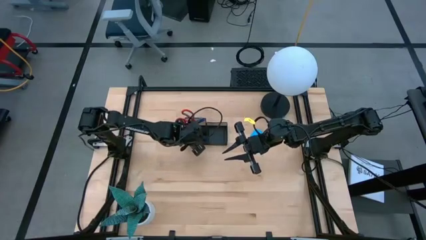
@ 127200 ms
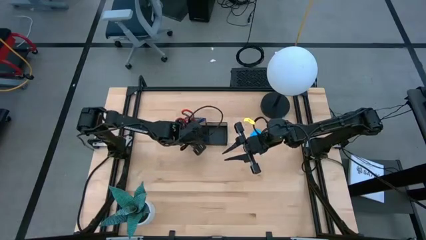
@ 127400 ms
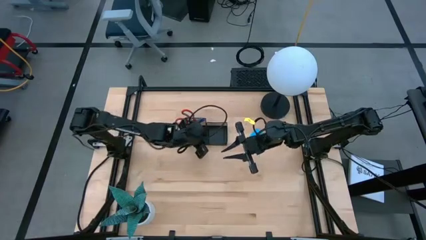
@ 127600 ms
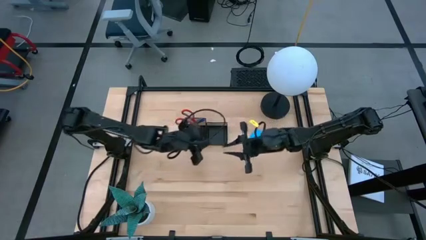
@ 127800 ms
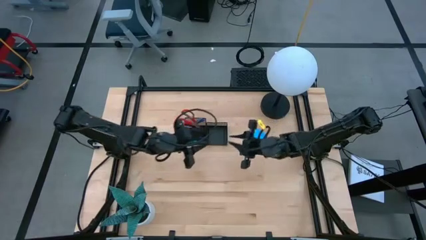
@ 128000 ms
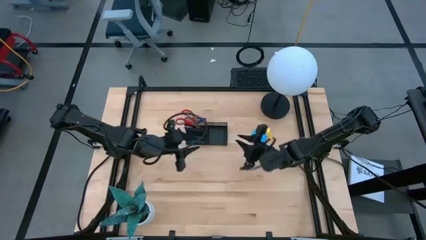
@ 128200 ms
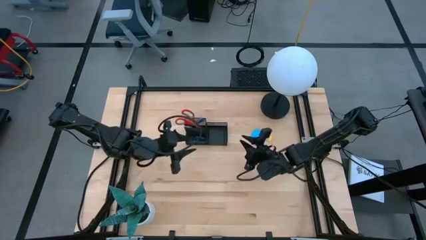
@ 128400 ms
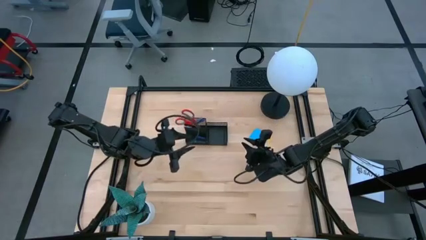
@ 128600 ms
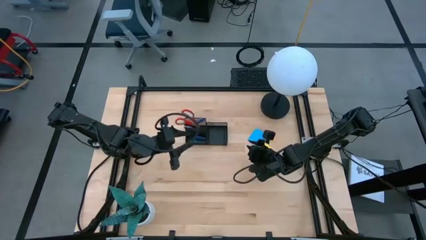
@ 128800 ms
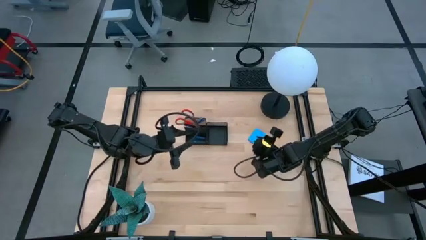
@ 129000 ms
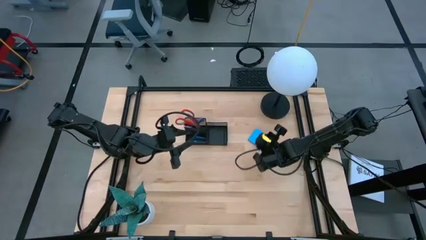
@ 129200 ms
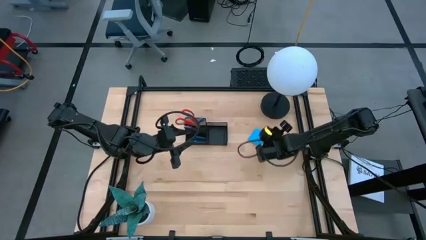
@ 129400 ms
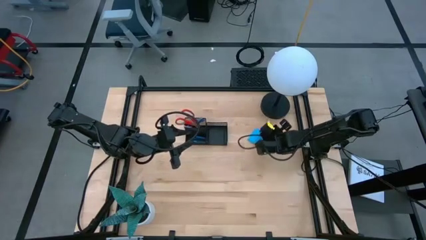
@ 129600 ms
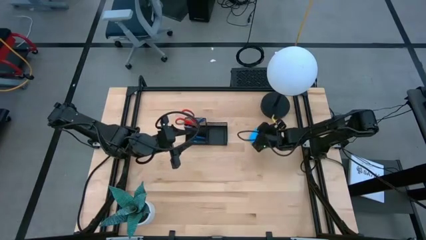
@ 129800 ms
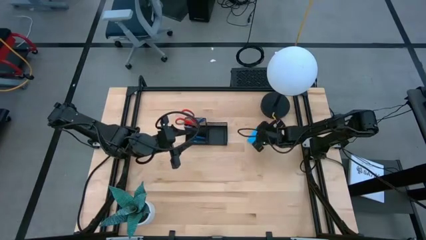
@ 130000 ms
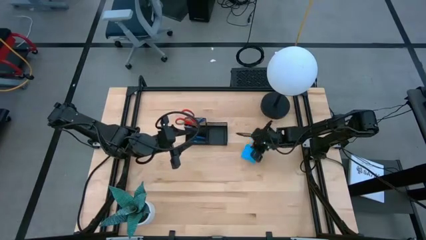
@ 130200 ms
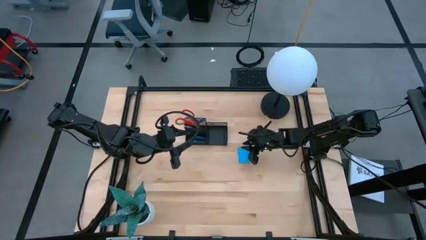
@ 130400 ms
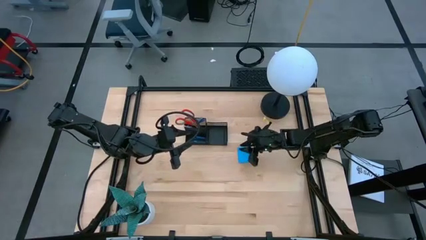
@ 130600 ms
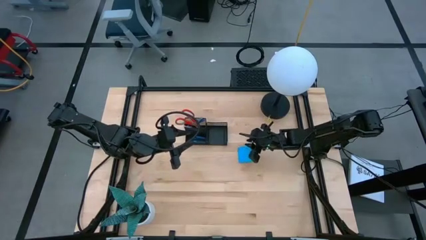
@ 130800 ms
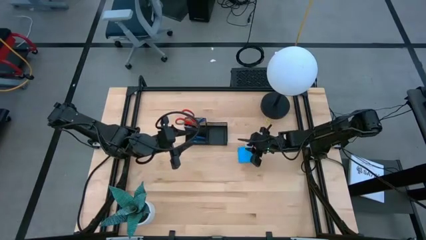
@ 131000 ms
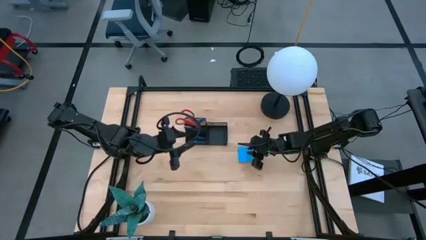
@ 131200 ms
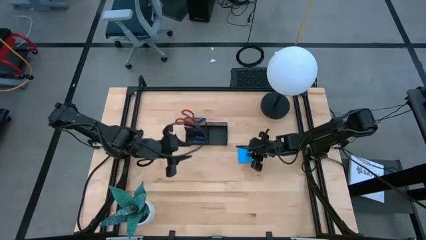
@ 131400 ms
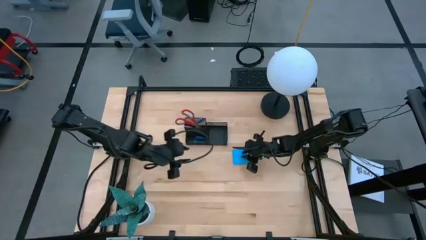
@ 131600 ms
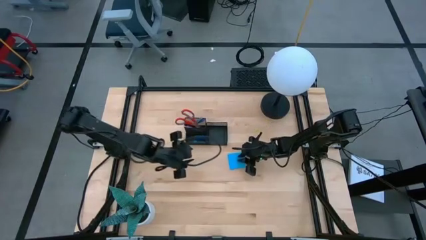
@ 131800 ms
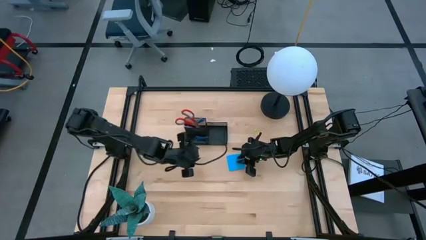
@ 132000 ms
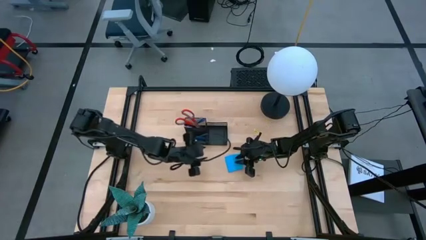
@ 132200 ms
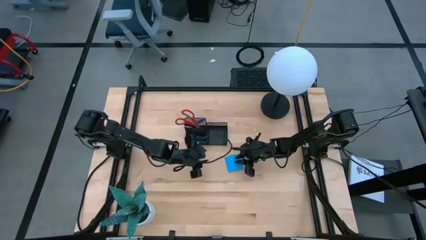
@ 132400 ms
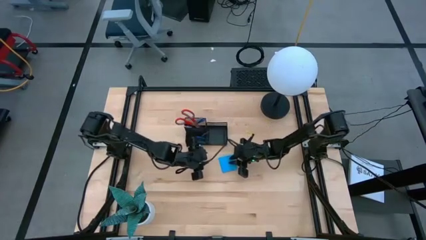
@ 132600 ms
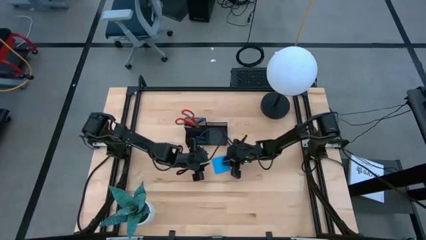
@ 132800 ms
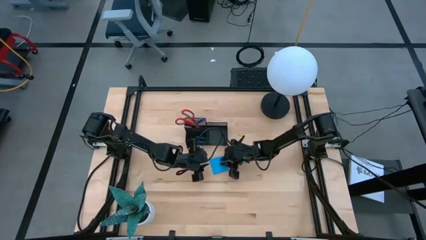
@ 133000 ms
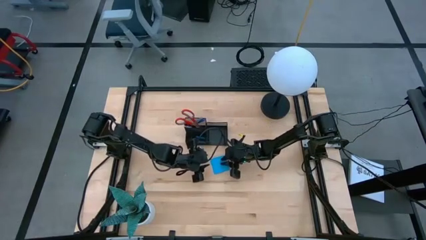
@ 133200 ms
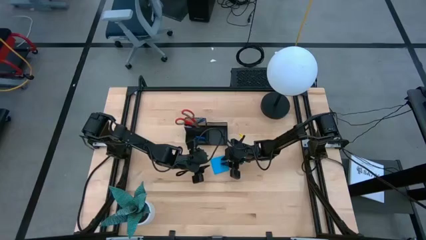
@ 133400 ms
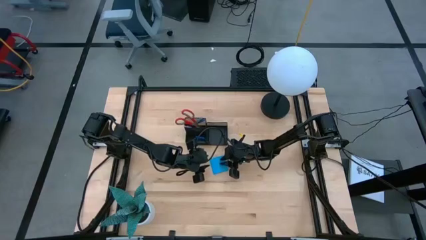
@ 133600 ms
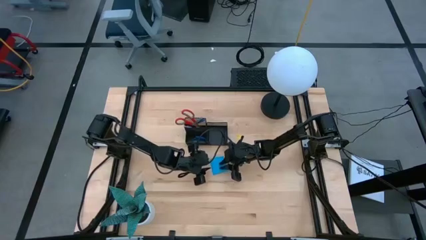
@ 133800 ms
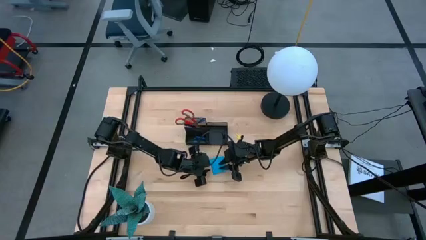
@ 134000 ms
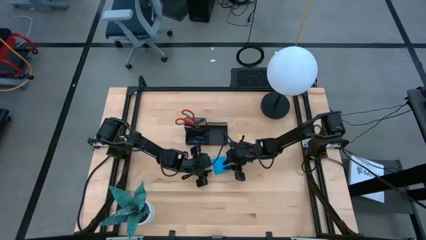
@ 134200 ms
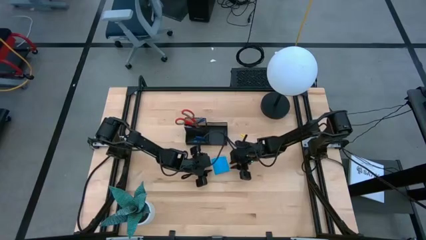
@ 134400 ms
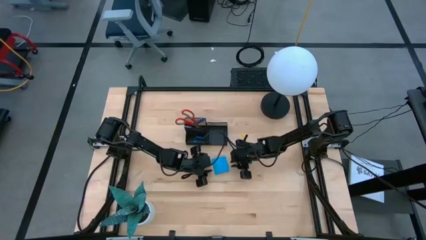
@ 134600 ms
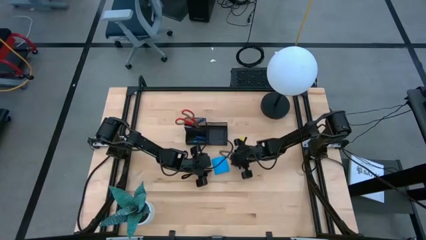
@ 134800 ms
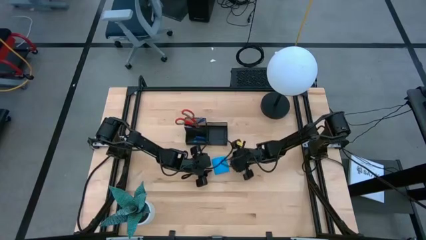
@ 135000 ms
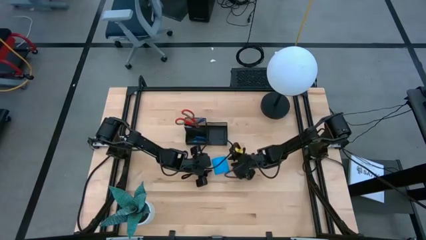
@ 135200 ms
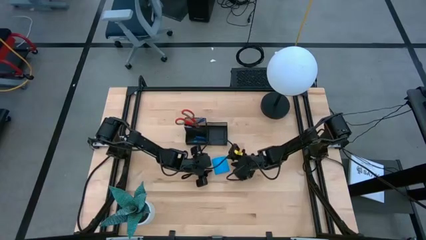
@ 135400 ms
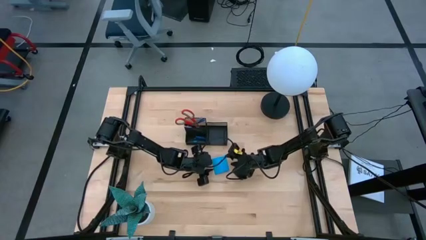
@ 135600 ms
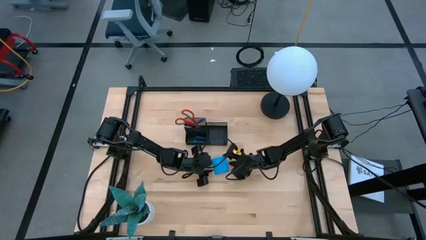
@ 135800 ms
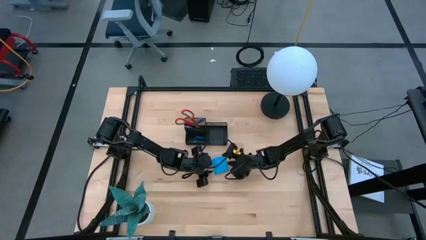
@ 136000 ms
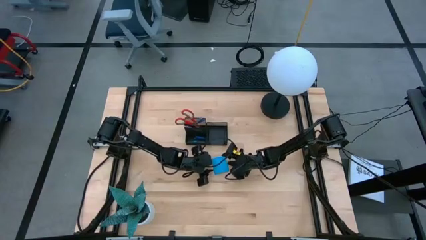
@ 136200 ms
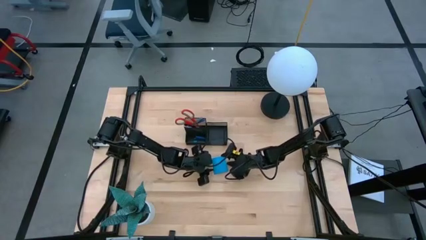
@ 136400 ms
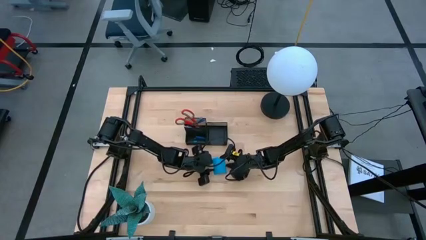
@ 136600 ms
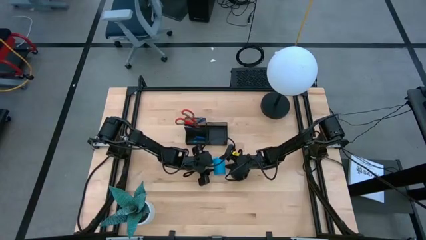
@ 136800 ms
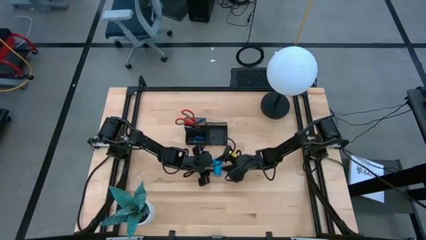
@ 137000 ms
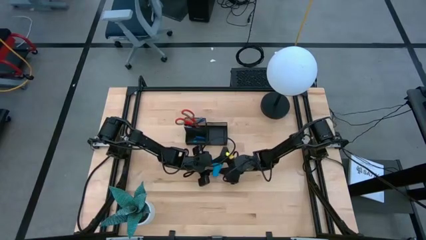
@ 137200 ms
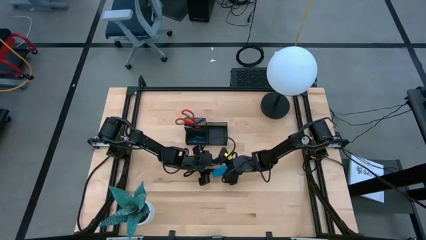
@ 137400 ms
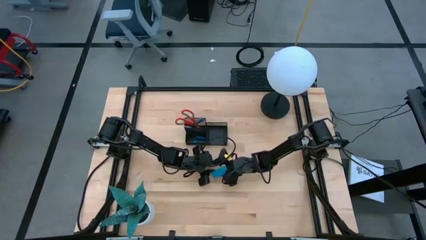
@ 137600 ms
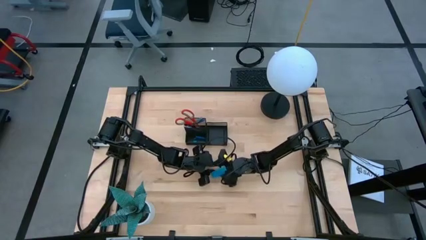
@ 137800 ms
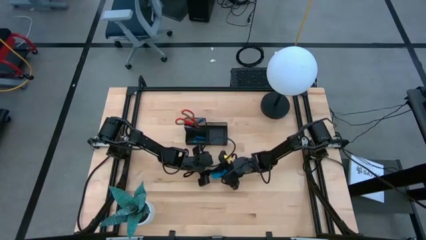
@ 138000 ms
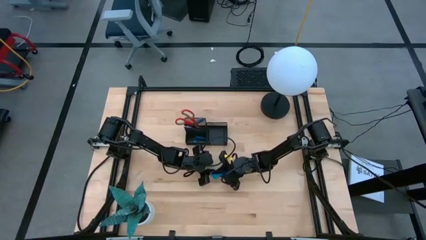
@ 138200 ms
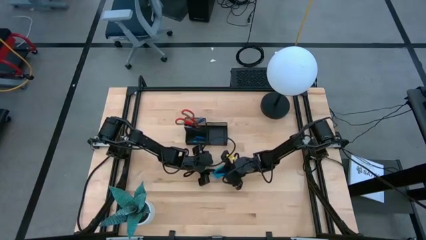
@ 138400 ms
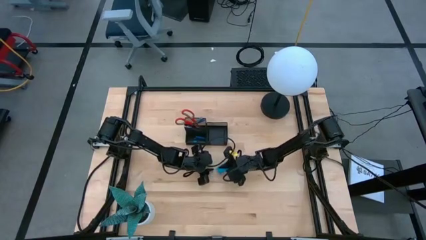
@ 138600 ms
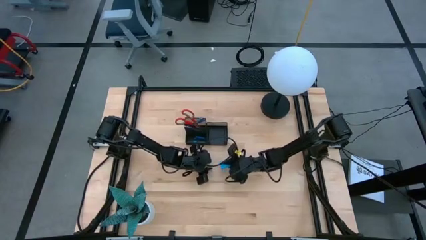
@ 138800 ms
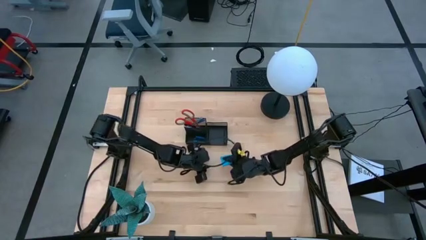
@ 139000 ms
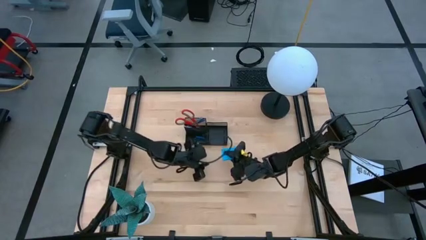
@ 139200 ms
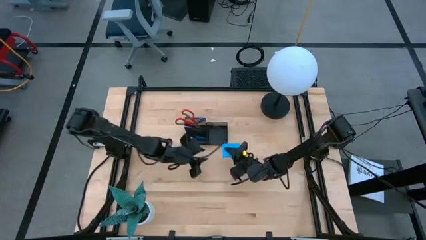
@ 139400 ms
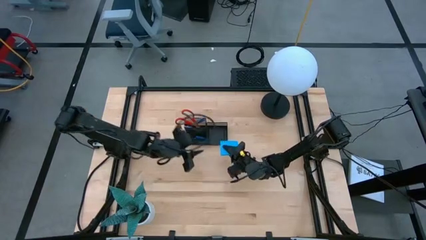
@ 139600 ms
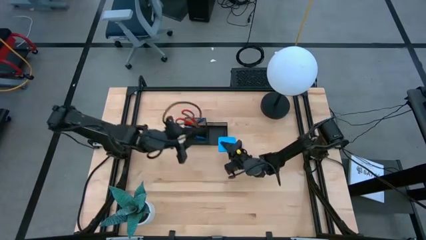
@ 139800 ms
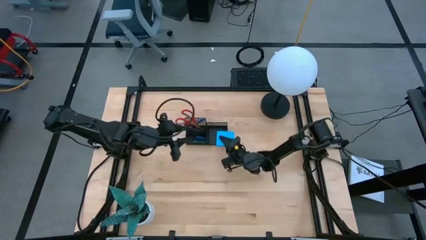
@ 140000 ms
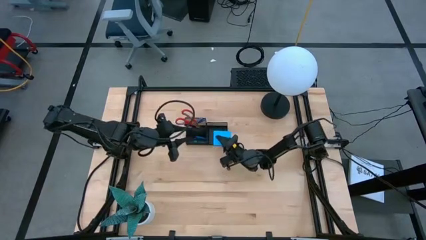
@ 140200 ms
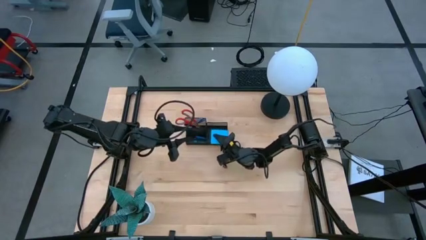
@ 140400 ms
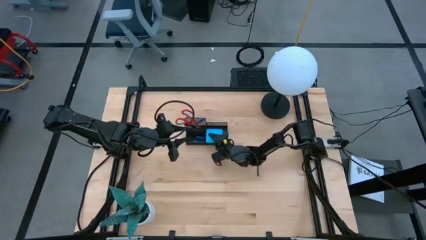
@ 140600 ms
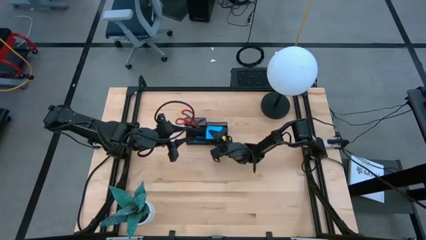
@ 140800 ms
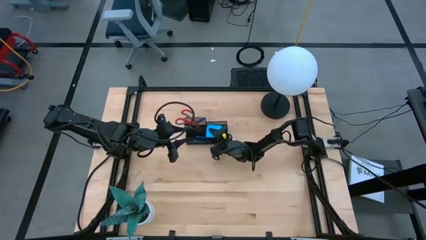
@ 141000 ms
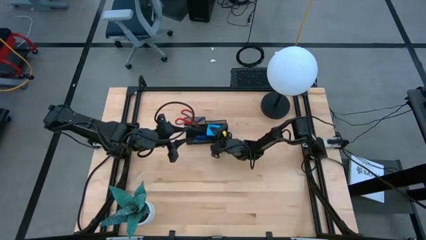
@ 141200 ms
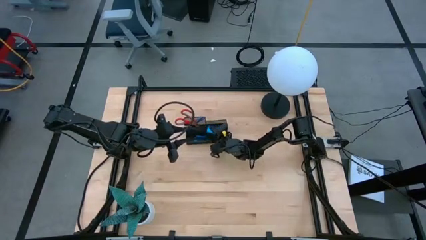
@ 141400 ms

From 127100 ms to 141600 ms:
Task: Pick and place office supplies into organizer
Put the blue sticky notepad into the desk organizer

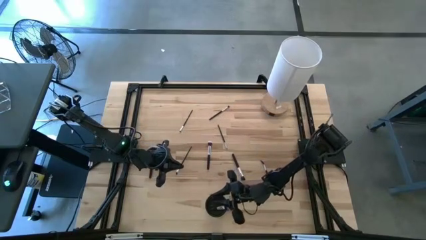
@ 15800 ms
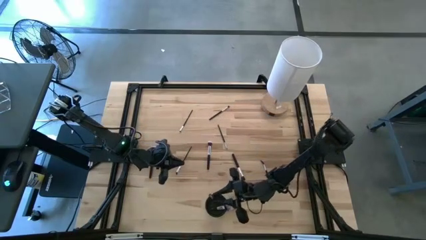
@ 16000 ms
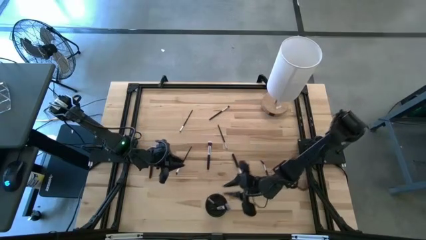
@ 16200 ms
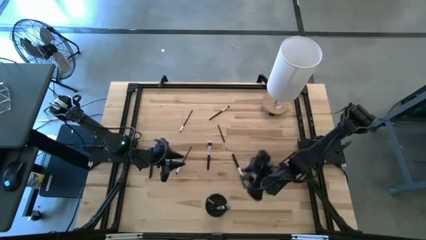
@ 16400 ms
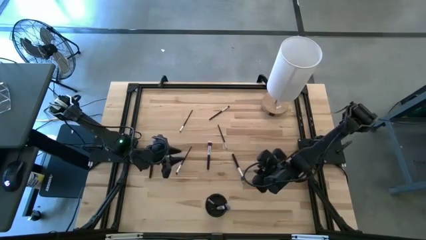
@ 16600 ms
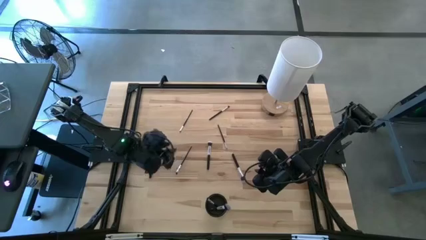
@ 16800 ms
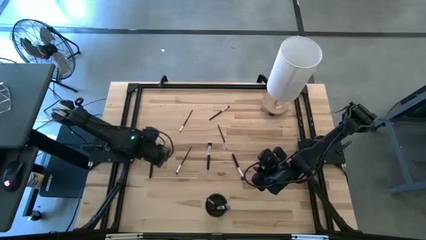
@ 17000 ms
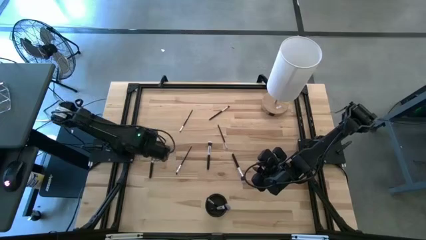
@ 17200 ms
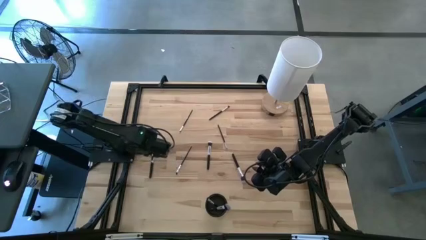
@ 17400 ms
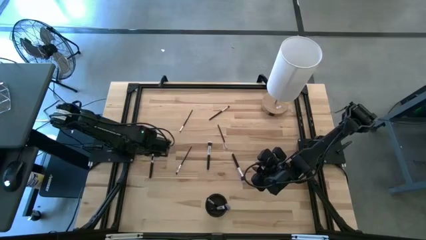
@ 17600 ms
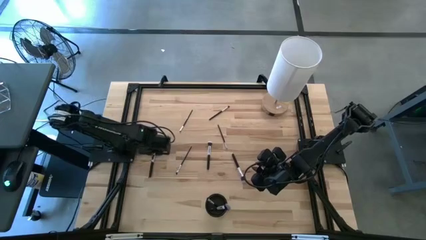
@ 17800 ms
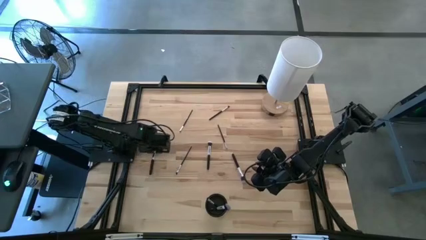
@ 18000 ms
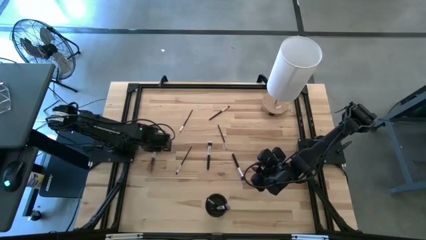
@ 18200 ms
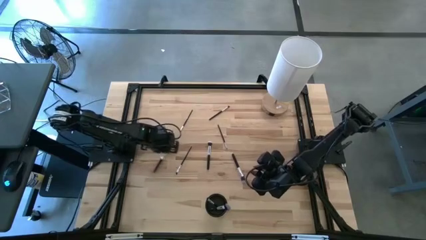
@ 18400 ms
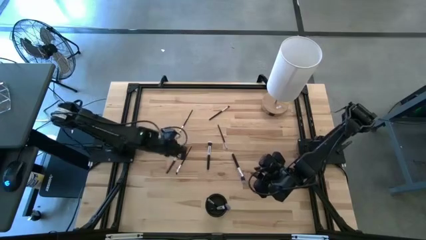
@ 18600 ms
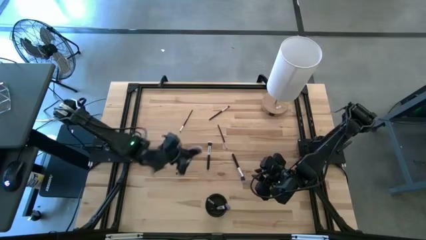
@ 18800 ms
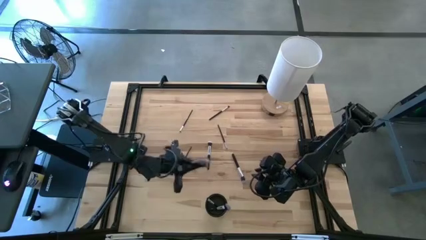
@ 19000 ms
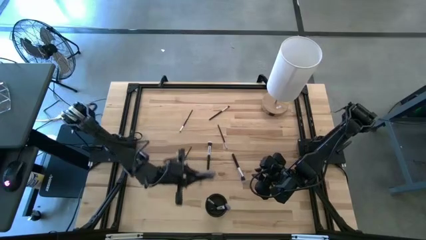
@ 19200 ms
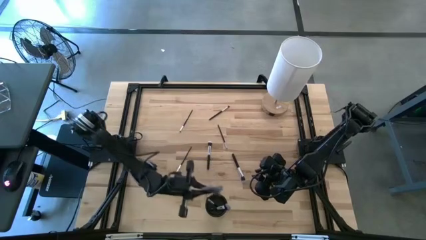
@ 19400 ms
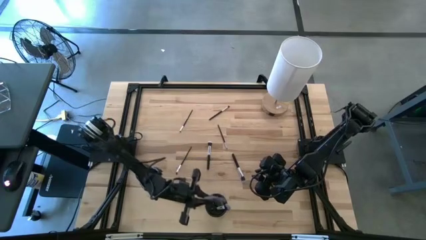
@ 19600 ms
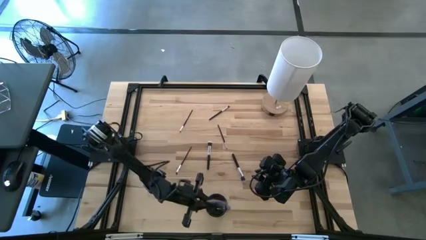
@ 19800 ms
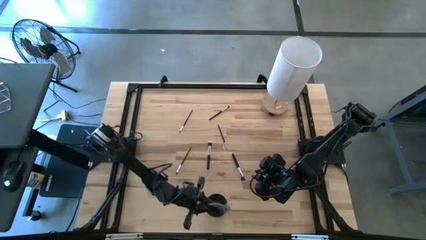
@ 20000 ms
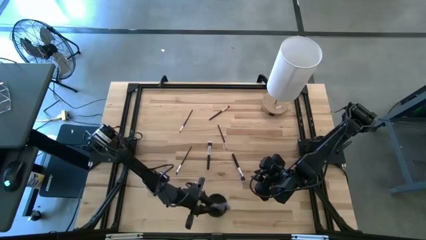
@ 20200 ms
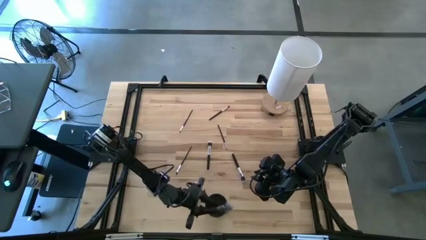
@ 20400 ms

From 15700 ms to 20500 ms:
Task: Put items in baskets/containers
Put the highlighter brush into the black pen holder
